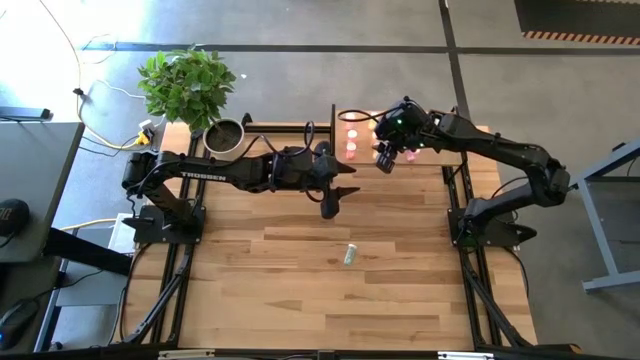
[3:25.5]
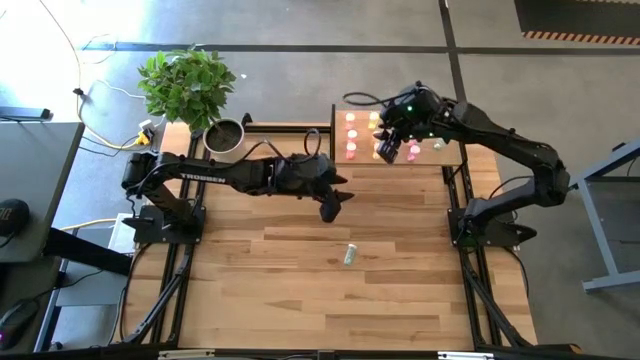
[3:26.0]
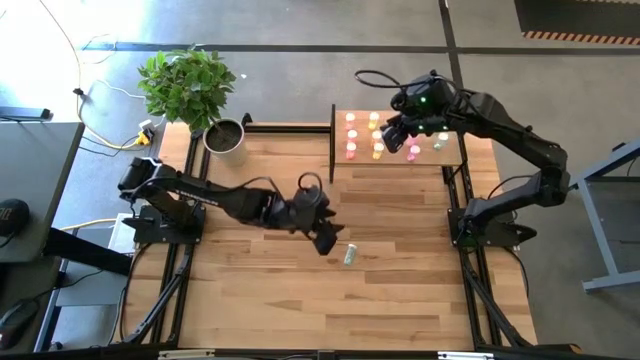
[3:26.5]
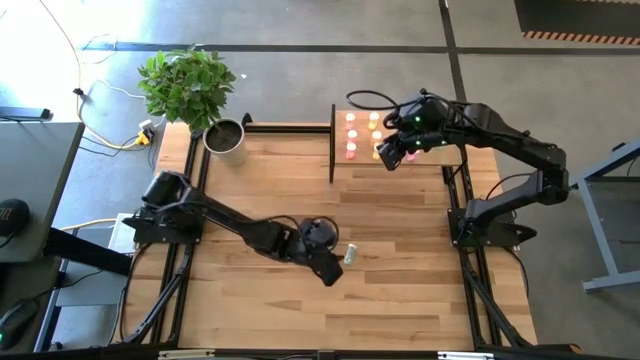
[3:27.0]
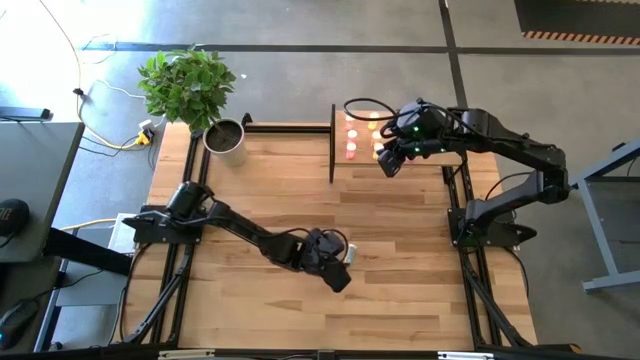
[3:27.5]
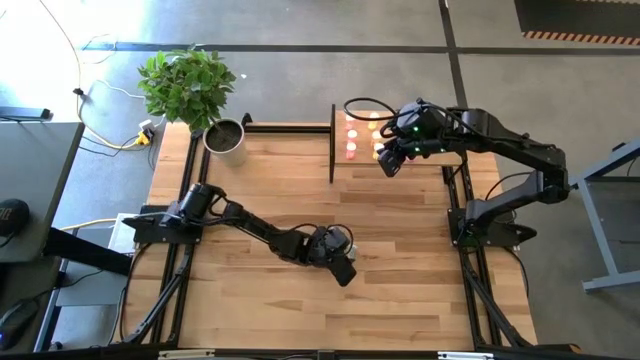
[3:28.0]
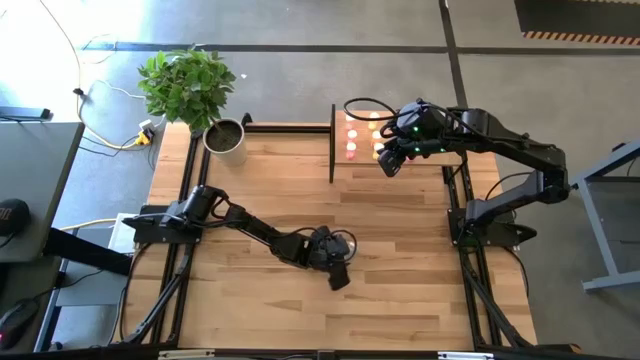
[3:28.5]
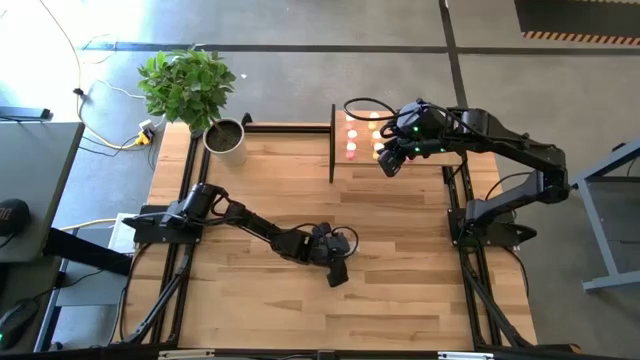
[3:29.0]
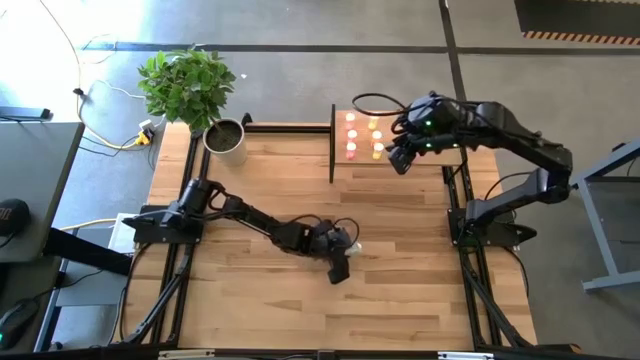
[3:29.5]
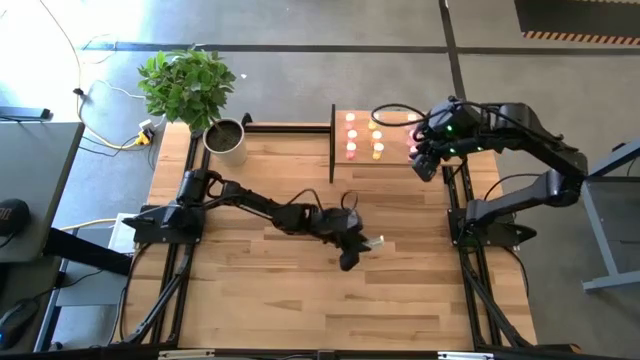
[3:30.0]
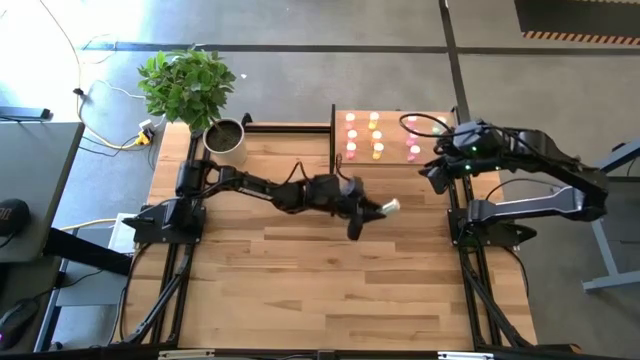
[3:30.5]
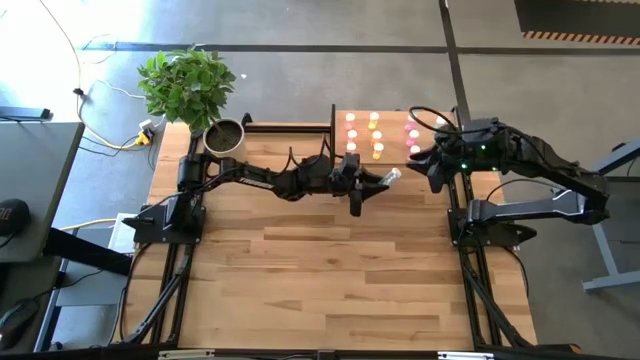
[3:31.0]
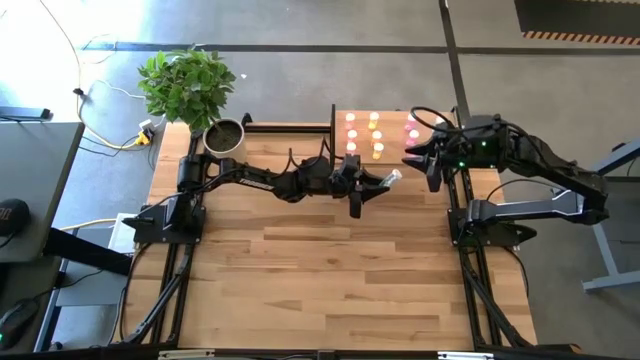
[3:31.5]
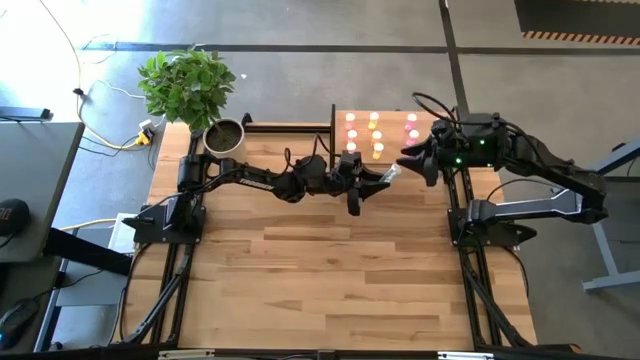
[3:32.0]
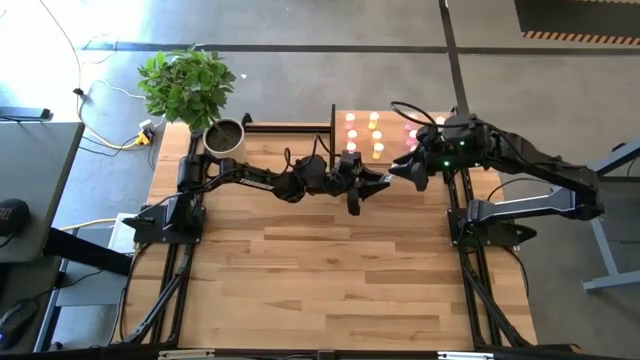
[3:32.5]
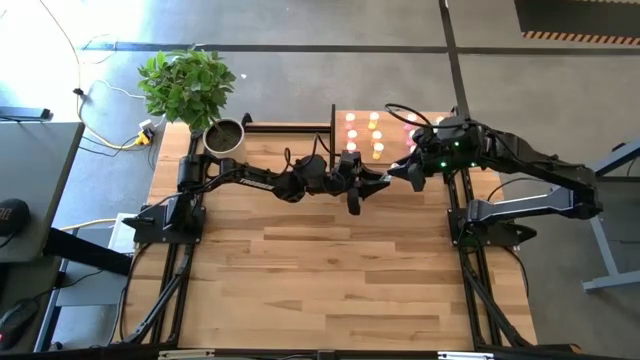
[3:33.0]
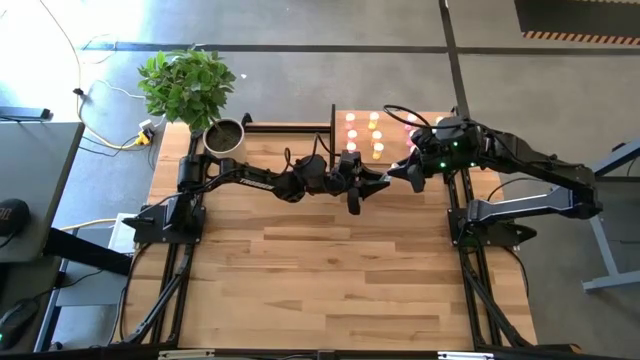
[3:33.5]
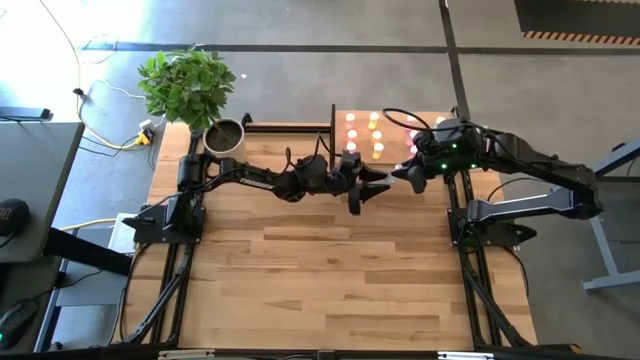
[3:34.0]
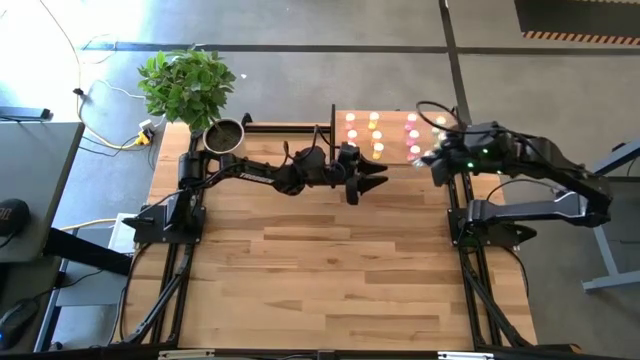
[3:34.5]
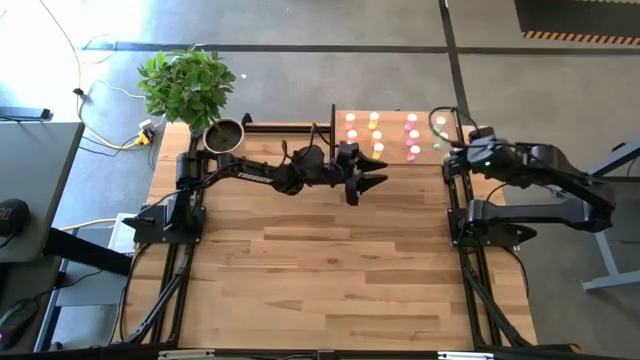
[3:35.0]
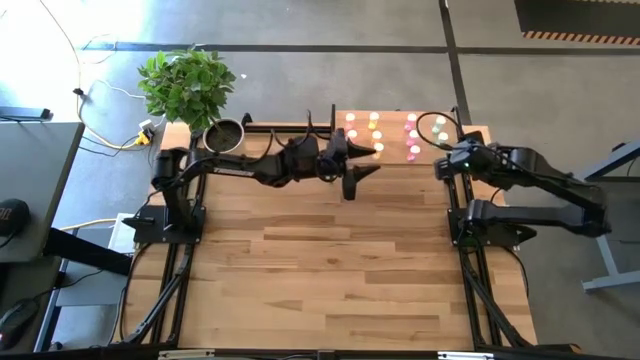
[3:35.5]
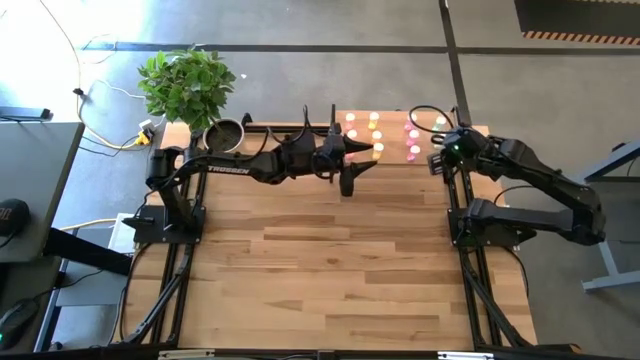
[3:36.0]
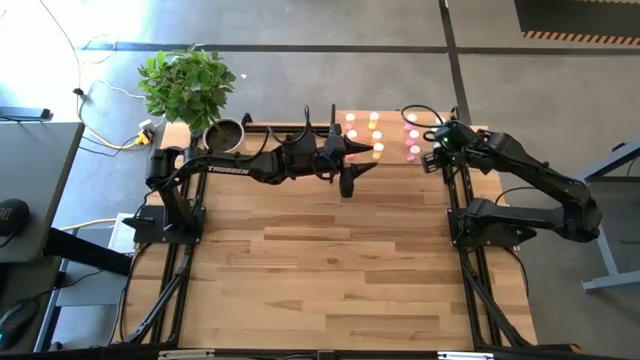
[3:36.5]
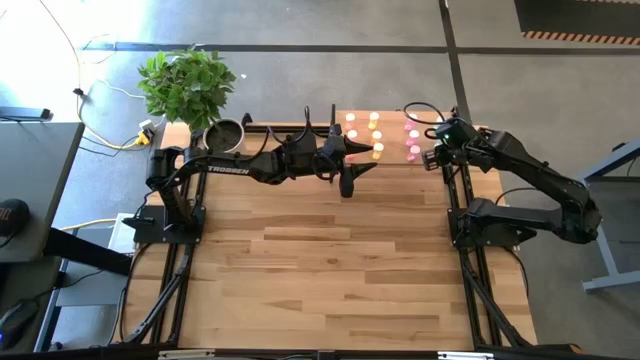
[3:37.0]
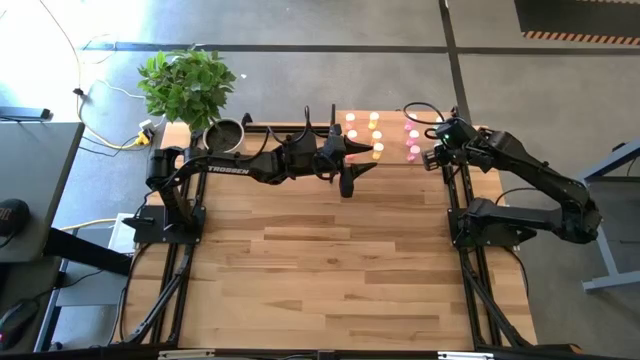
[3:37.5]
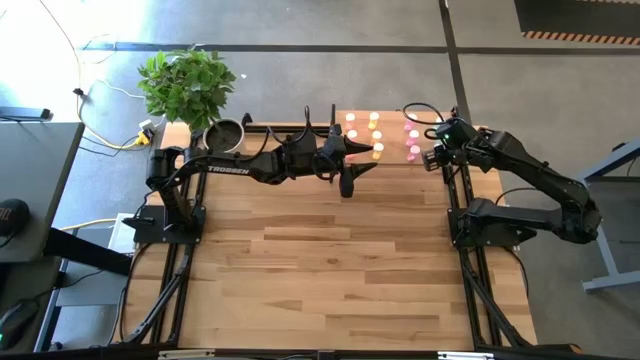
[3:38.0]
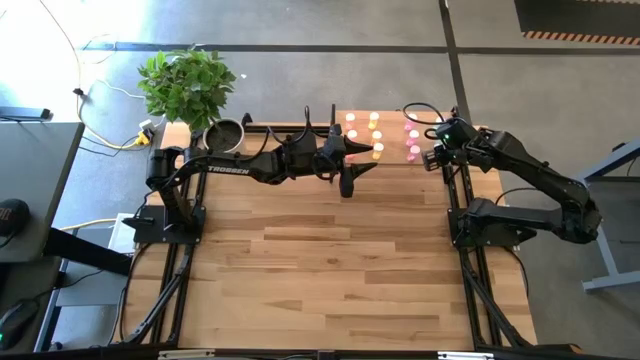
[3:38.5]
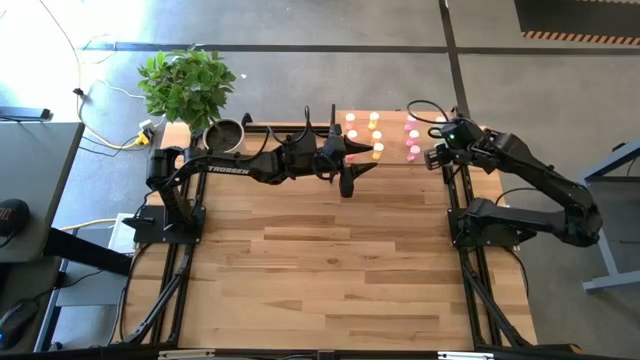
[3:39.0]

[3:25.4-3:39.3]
Task: Pick and place medicine bottles onto shelf by color
Put the blue medicine bottle aligned with the other blue medicine bottles on the shelf

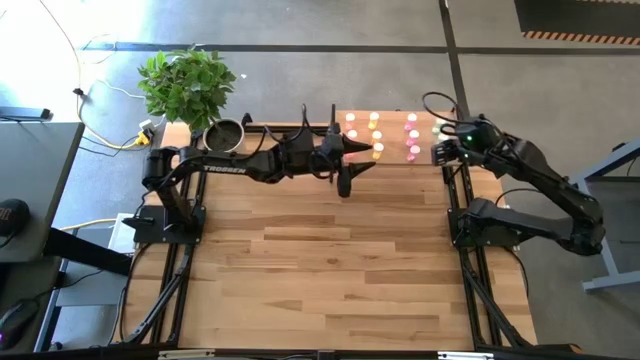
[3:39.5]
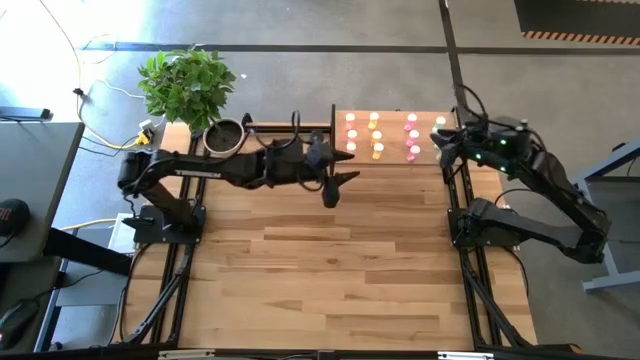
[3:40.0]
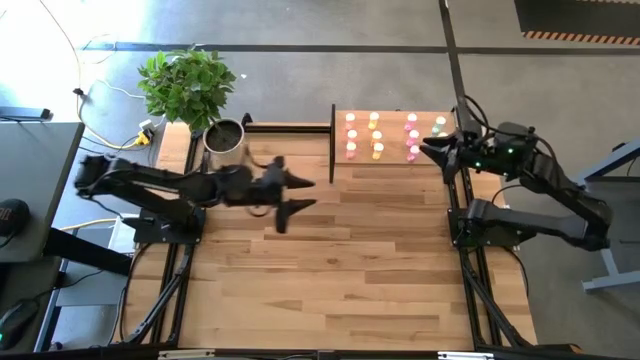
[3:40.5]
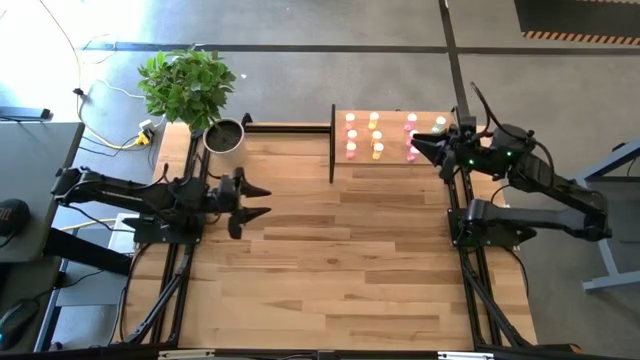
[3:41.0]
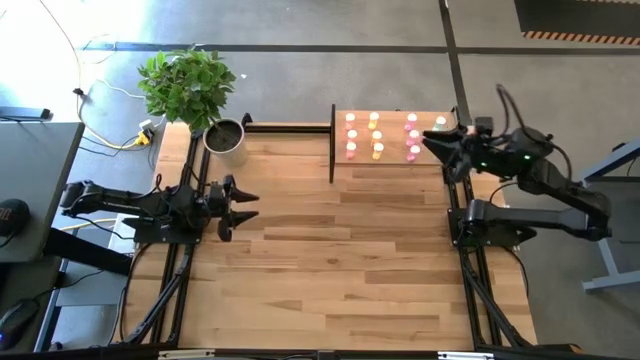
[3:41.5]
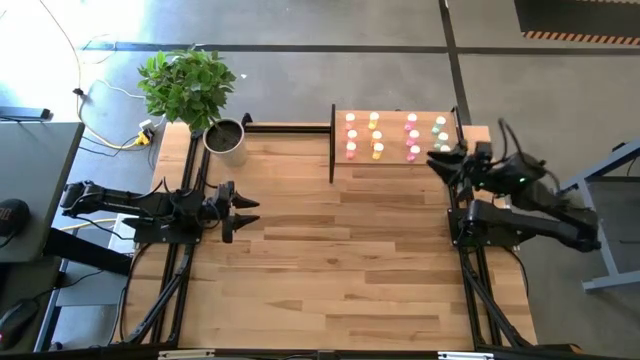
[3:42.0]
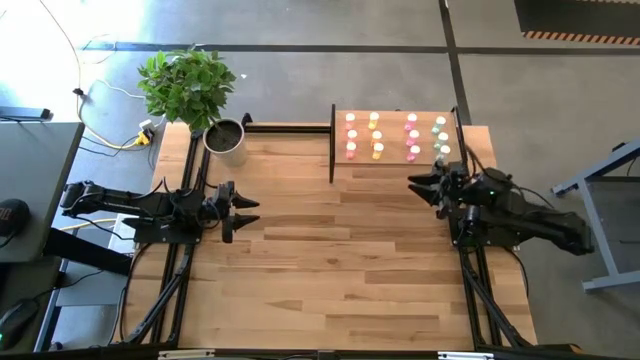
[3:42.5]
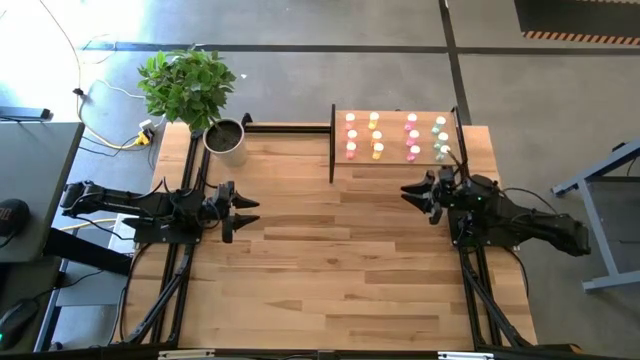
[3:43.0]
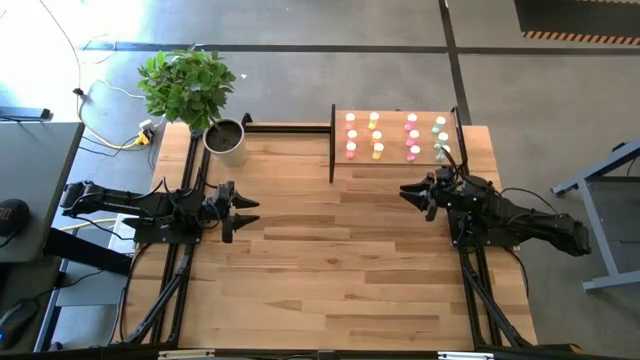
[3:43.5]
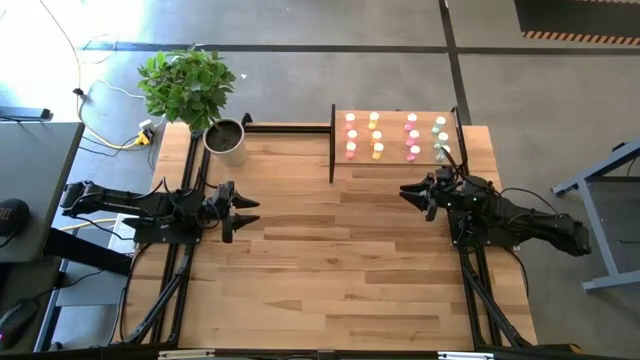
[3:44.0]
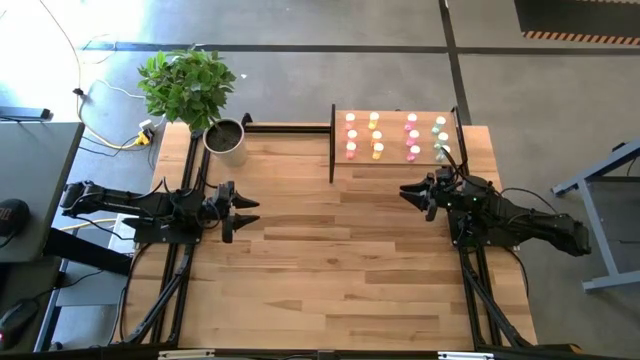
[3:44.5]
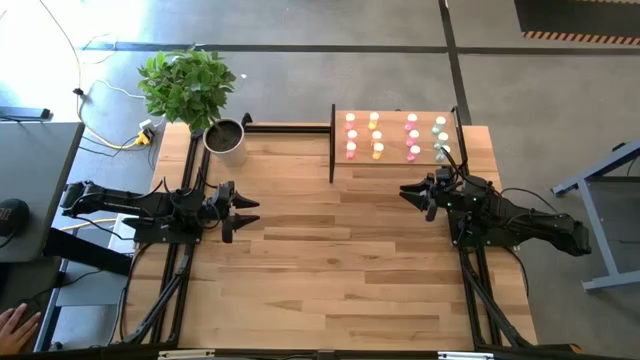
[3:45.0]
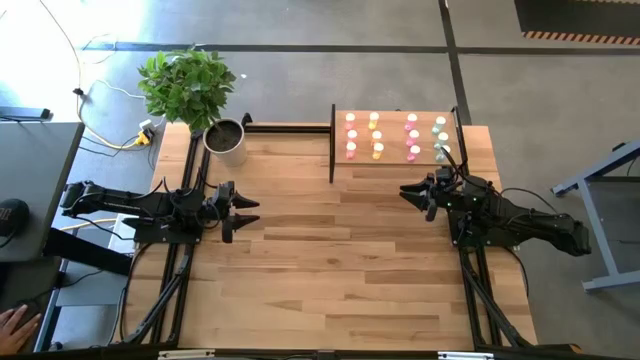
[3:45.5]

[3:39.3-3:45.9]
Return to Home Position
